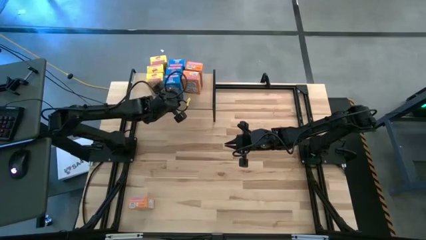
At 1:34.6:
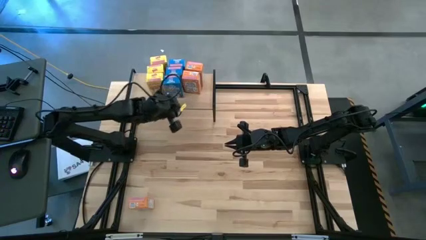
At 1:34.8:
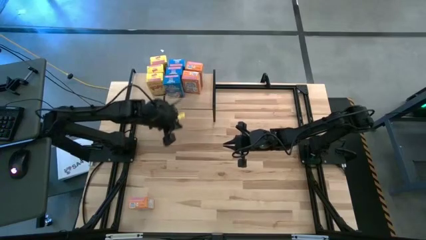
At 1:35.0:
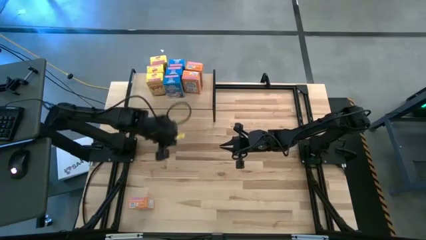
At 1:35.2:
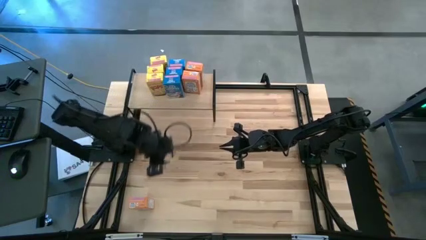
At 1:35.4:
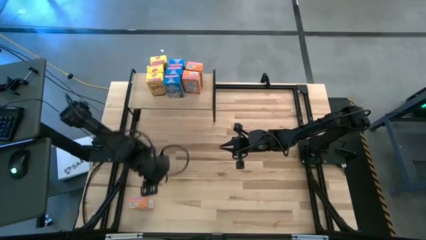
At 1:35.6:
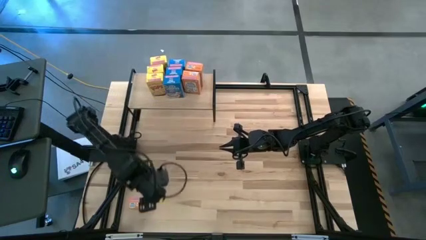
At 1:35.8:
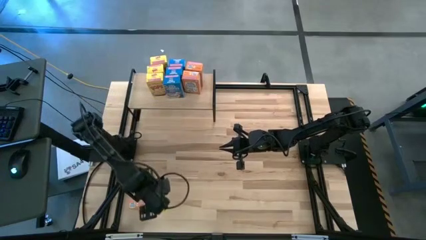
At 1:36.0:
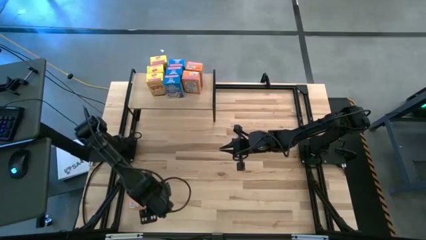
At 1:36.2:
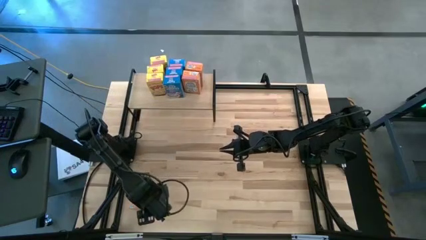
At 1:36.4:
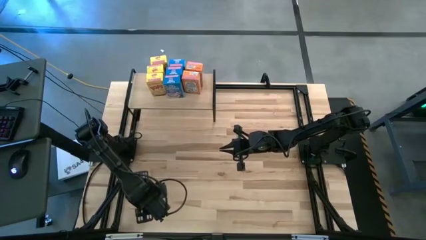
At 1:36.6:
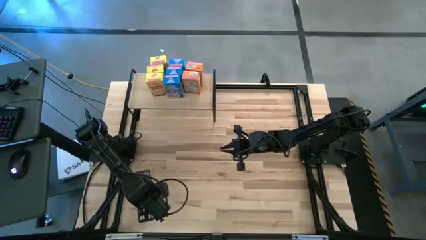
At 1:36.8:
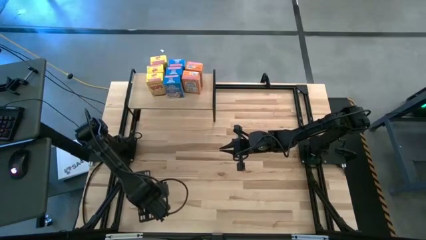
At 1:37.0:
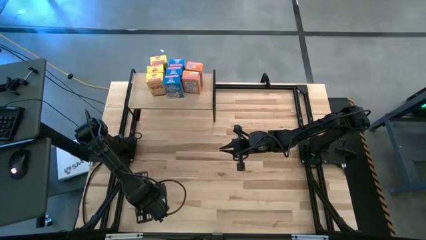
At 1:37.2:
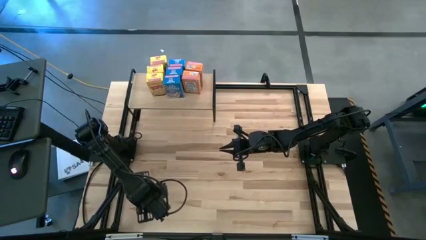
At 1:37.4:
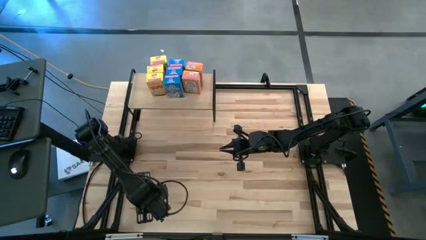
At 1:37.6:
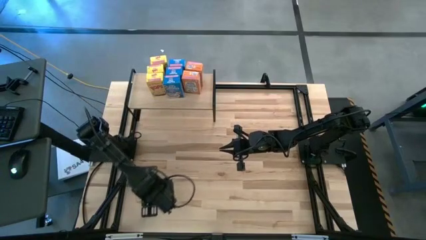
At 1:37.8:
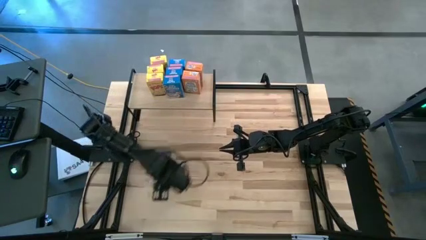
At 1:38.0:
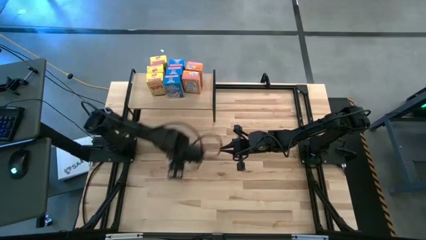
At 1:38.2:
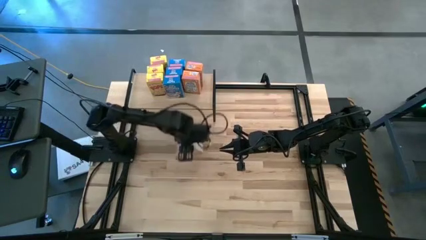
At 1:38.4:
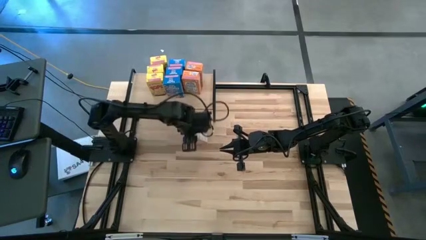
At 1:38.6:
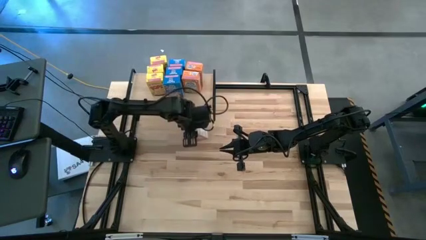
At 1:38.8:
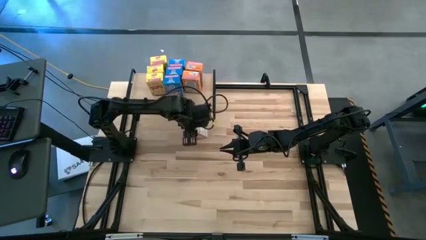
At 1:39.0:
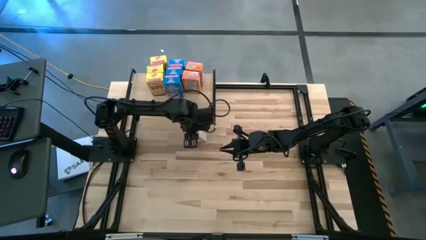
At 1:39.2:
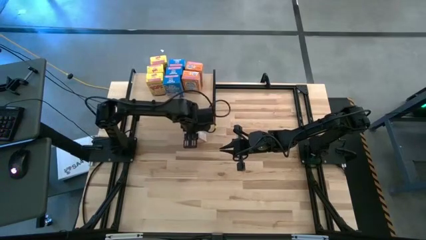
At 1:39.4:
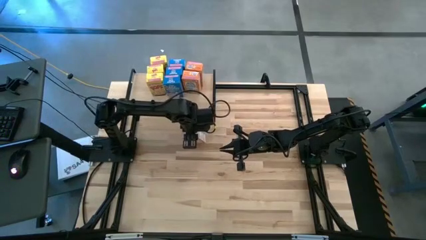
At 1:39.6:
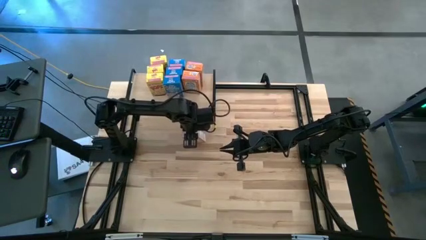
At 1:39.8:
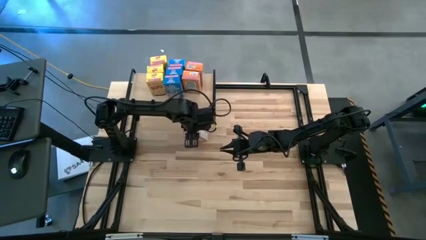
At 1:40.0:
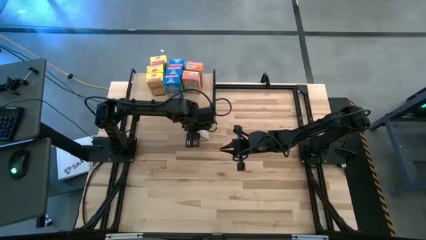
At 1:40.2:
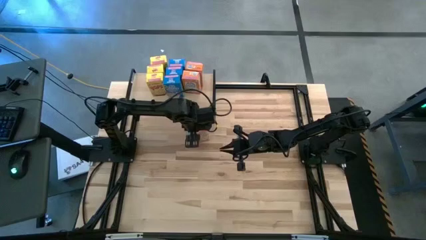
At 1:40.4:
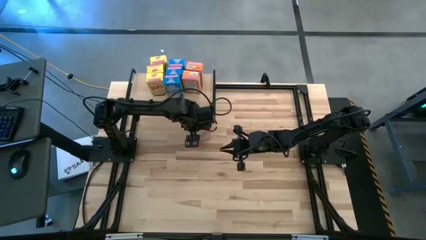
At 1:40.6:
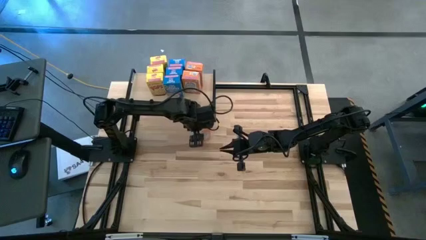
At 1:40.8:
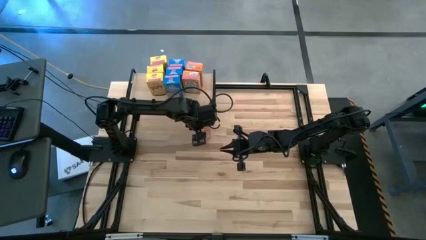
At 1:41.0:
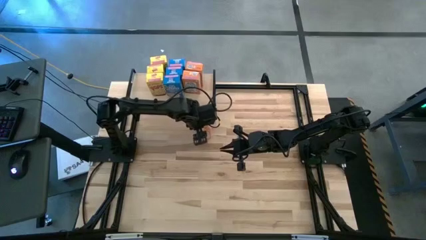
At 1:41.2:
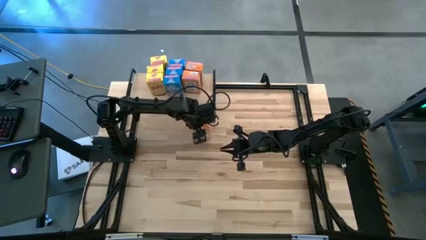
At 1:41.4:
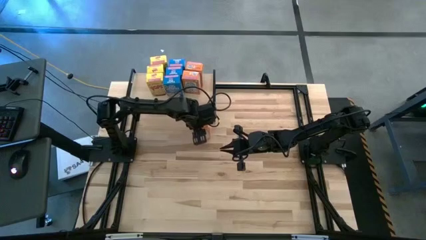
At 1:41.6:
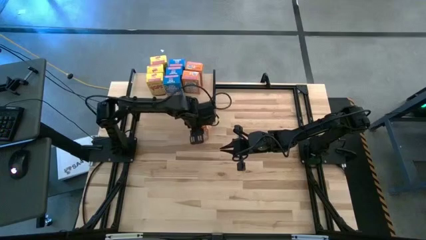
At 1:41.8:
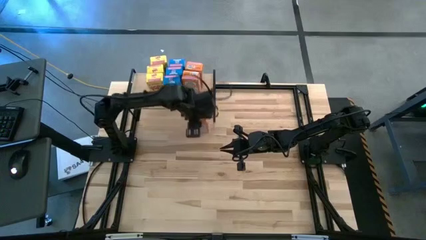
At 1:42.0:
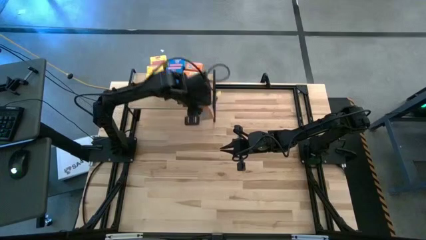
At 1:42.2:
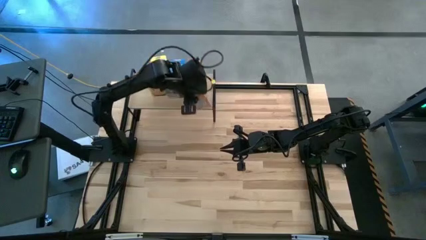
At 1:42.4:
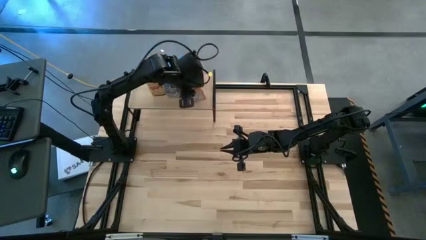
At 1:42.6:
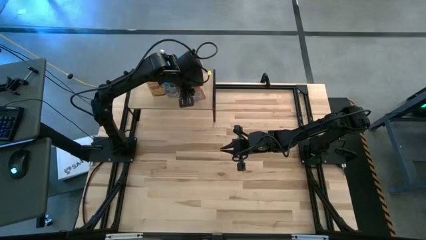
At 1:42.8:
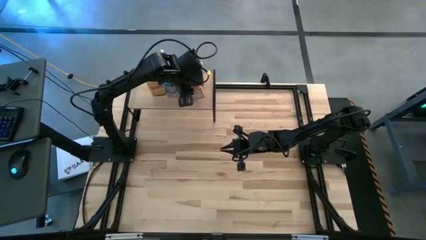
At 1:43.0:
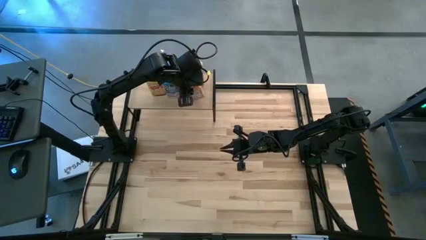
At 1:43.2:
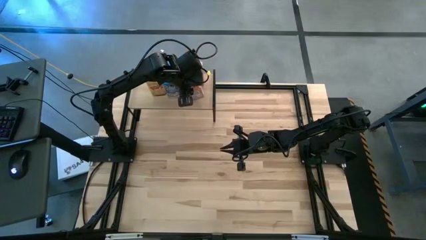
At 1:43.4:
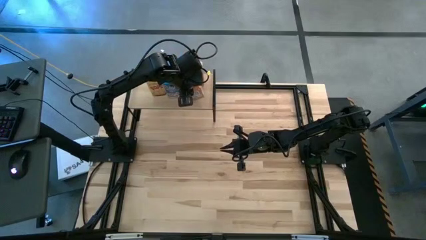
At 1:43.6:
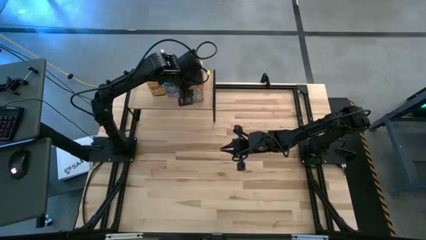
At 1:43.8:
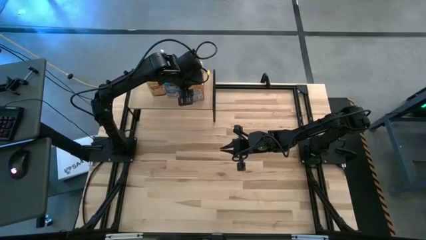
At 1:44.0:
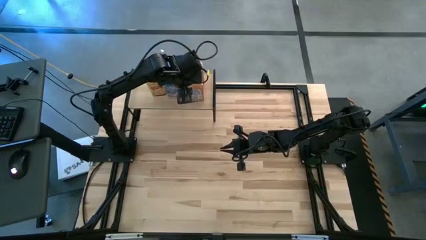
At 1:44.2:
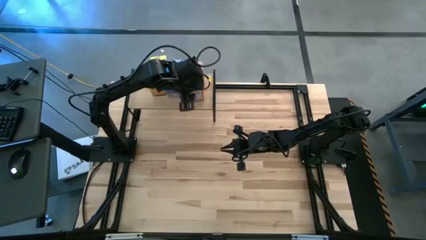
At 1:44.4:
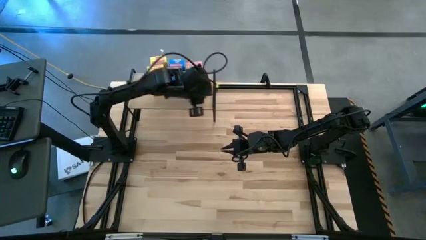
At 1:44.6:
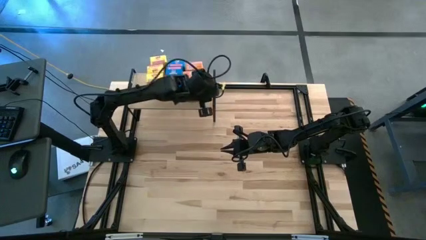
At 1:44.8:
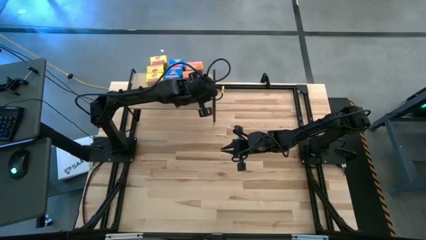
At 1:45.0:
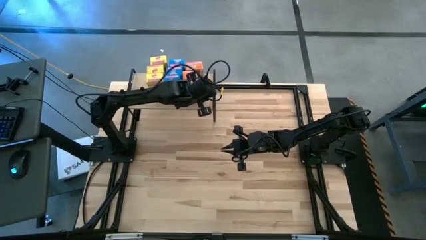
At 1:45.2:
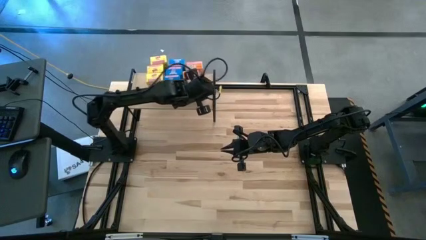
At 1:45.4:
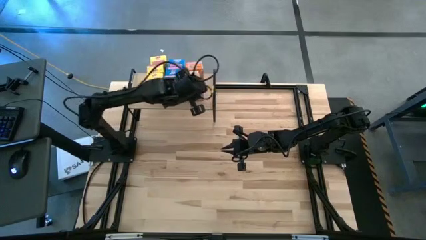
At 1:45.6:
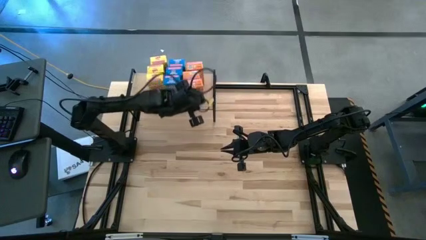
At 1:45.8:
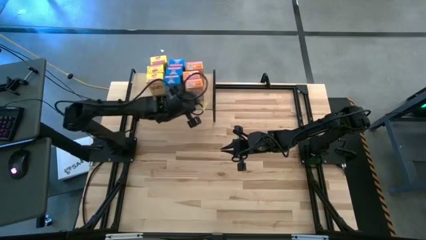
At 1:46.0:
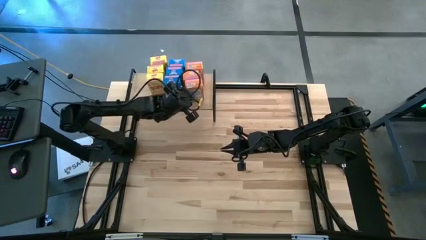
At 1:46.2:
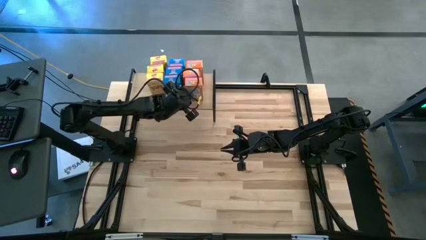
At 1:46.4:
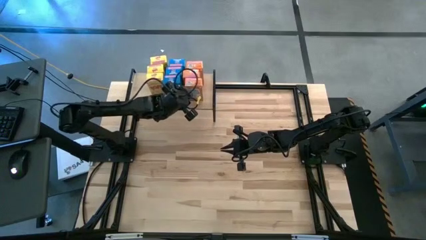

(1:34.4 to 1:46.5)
Task: Stack cereal on shelf
Put the orange cereal box on the shelf aligned with the other orange cereal boxes

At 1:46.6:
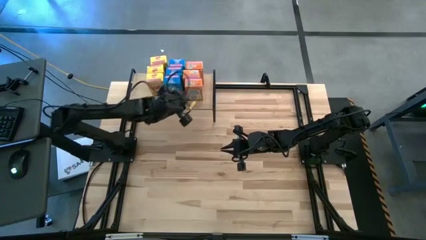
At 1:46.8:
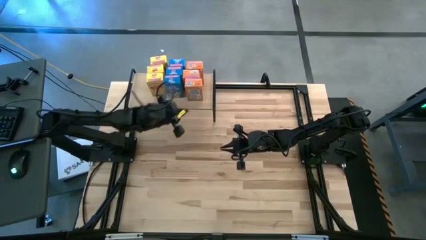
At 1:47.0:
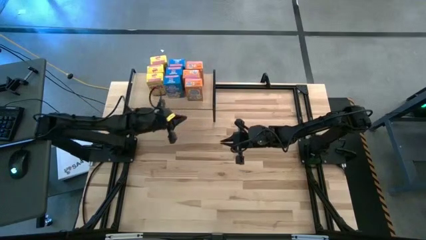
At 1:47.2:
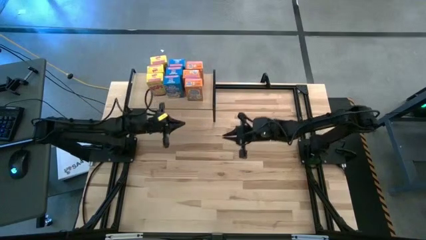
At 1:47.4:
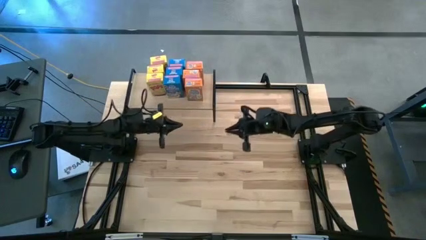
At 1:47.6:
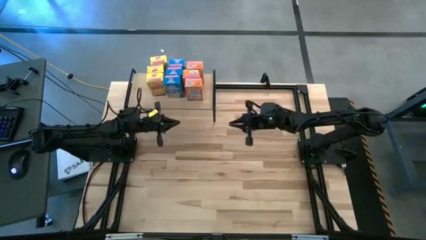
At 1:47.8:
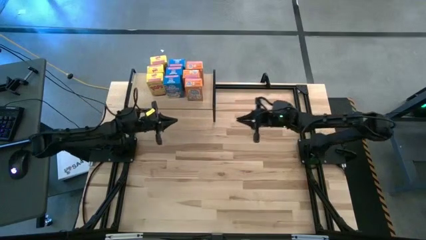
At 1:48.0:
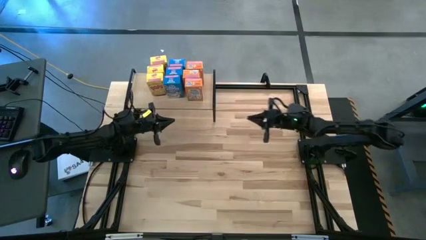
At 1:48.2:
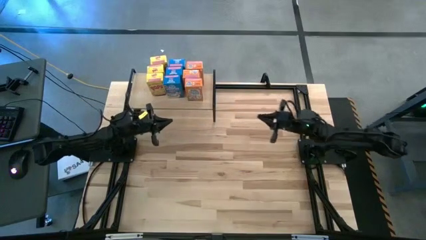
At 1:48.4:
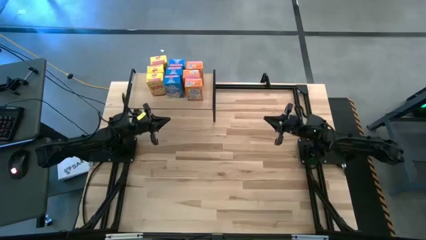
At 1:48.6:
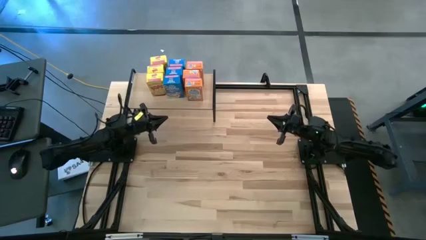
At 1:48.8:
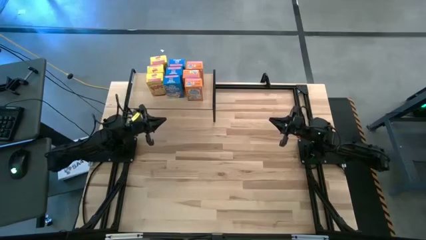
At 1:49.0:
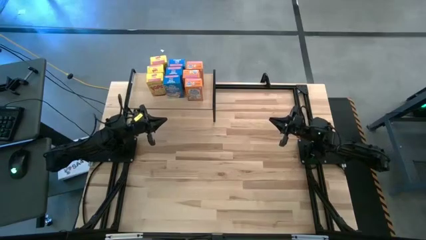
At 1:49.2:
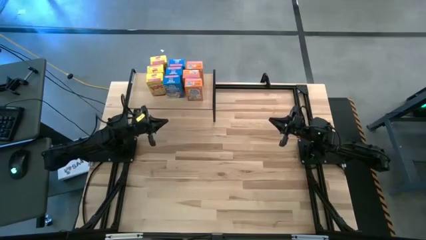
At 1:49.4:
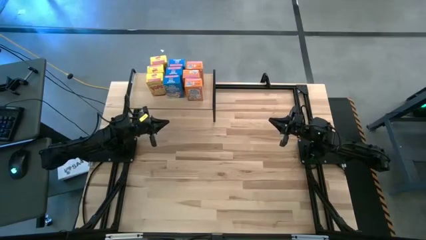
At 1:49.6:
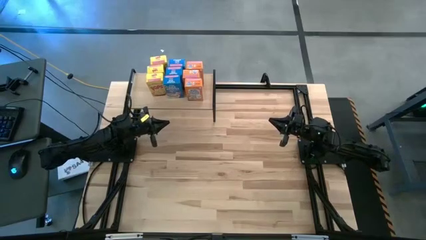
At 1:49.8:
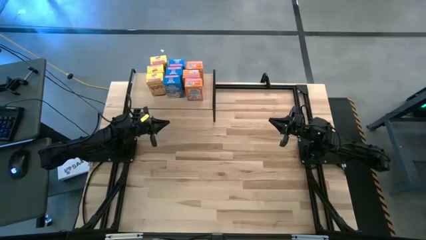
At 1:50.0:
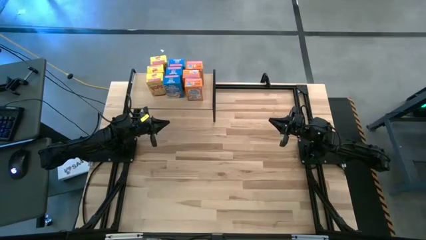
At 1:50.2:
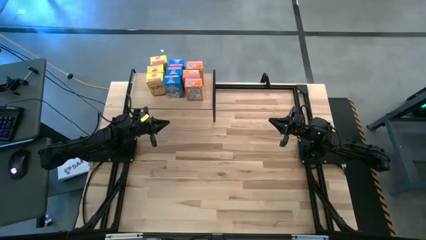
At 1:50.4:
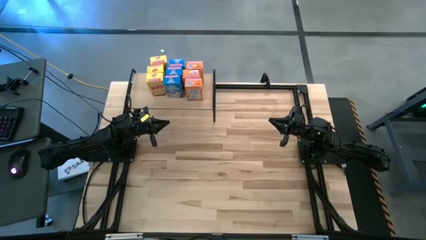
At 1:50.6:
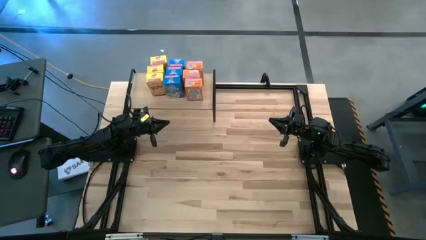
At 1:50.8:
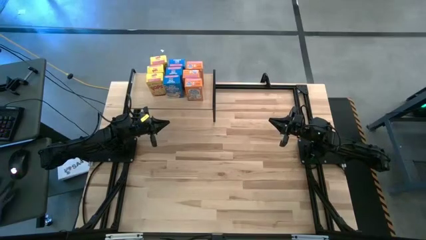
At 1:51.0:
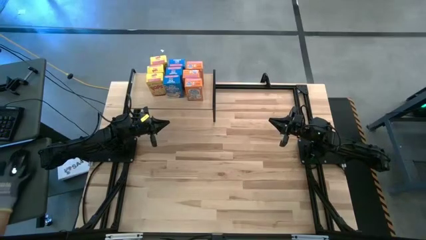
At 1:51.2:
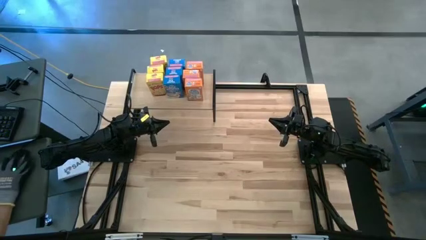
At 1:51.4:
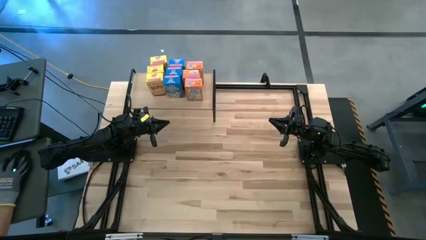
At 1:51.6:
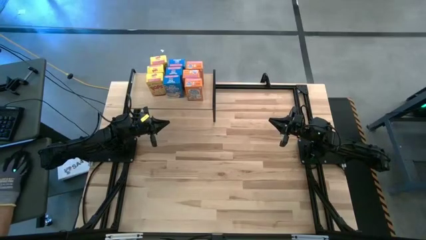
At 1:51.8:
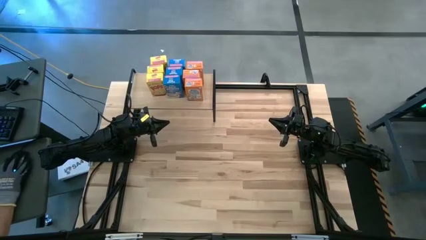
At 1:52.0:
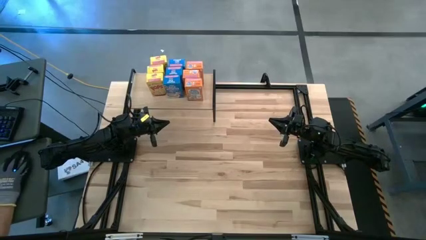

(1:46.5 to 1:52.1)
Return to Home Position
